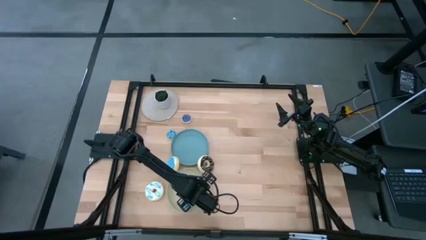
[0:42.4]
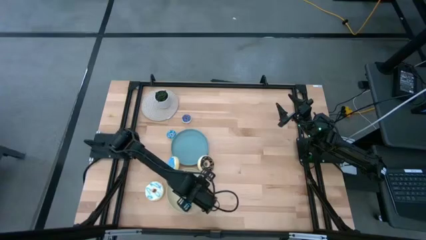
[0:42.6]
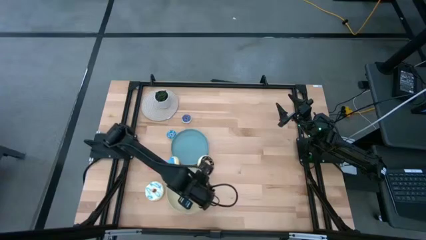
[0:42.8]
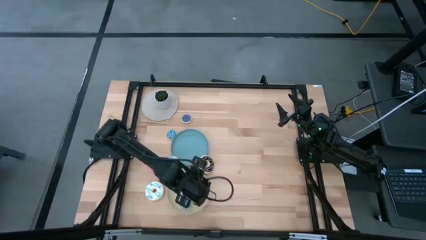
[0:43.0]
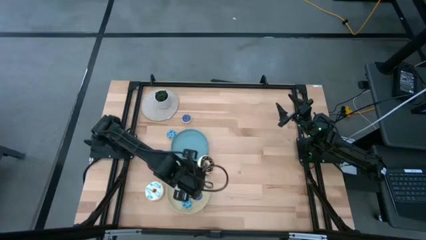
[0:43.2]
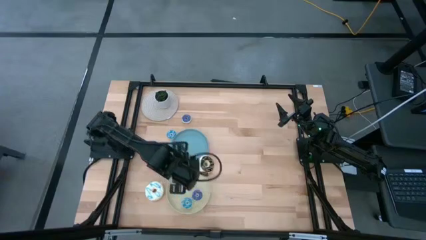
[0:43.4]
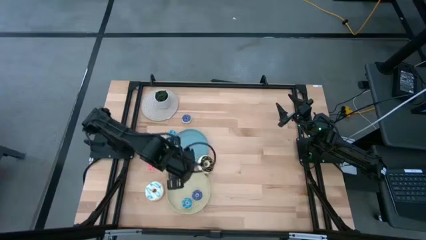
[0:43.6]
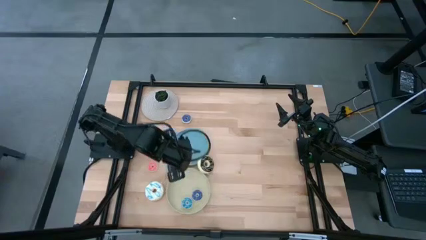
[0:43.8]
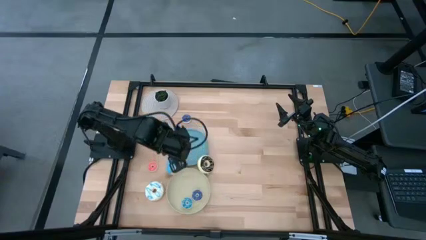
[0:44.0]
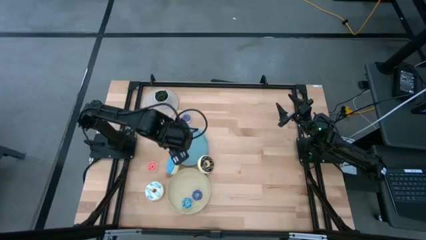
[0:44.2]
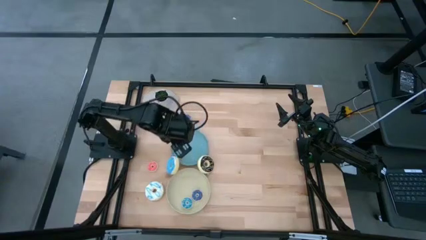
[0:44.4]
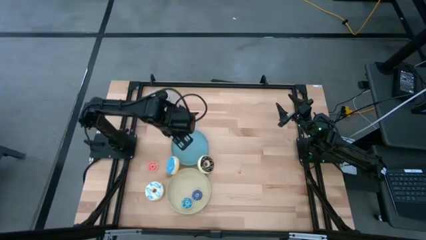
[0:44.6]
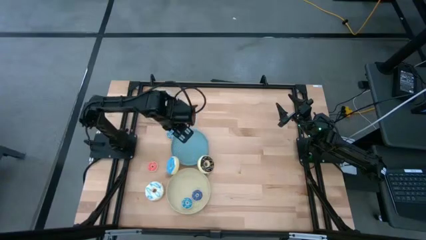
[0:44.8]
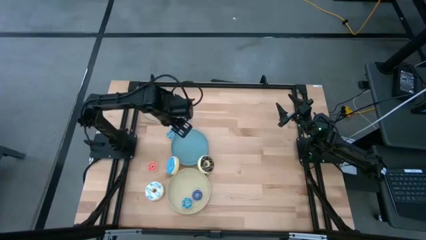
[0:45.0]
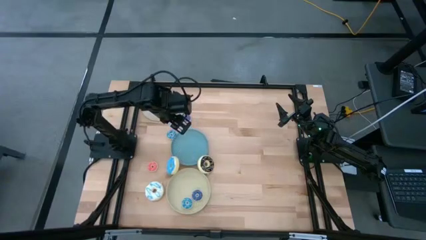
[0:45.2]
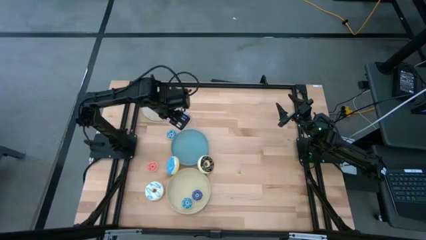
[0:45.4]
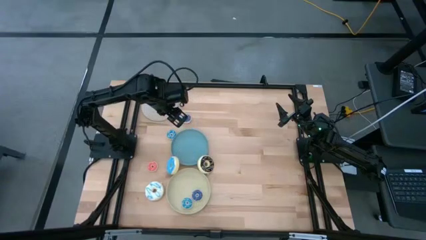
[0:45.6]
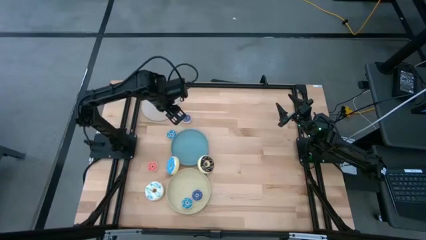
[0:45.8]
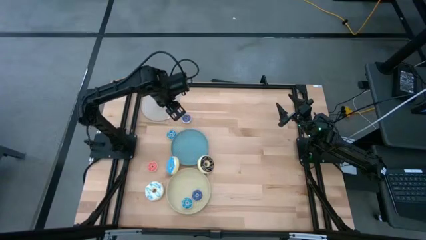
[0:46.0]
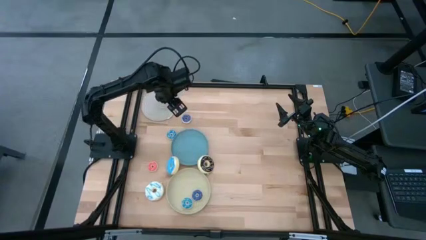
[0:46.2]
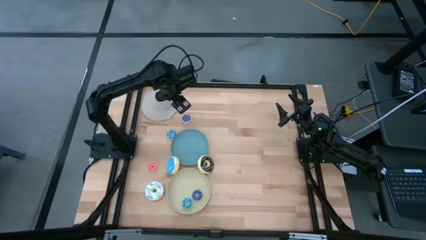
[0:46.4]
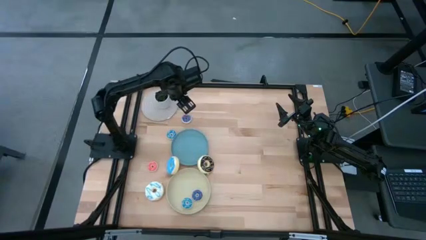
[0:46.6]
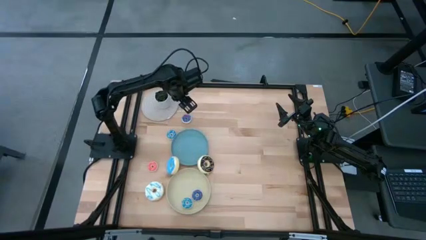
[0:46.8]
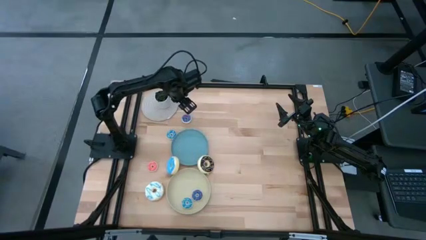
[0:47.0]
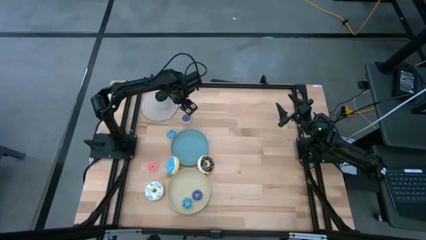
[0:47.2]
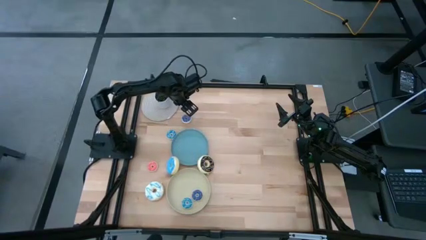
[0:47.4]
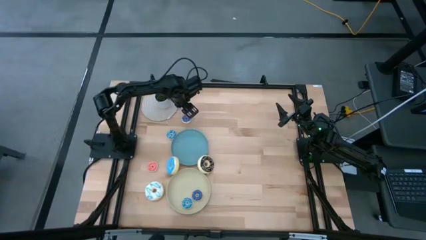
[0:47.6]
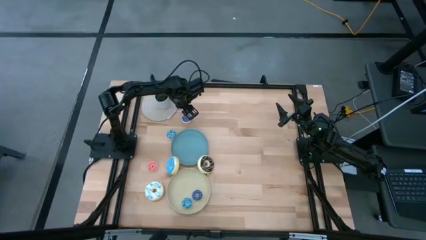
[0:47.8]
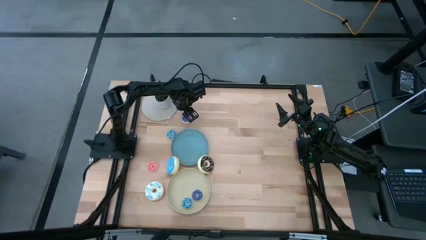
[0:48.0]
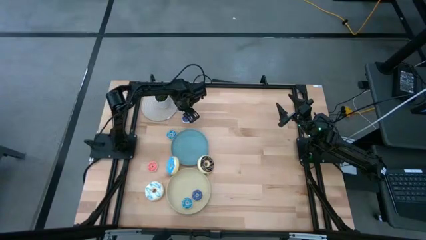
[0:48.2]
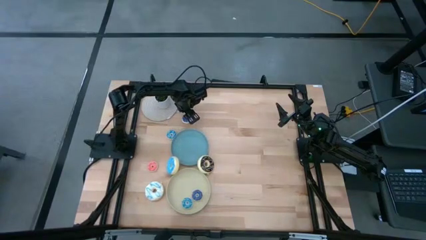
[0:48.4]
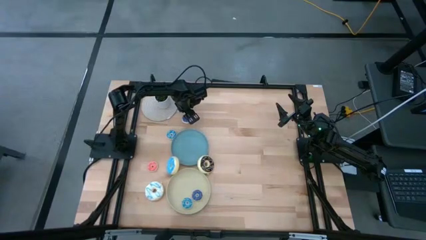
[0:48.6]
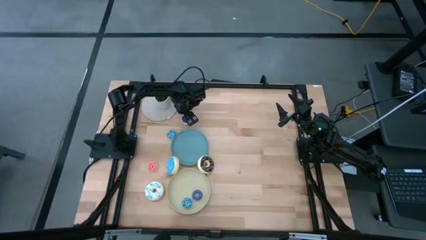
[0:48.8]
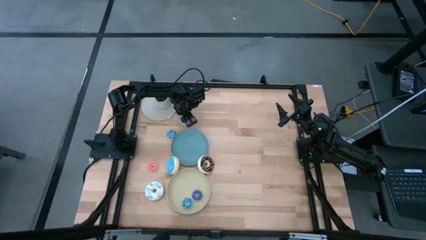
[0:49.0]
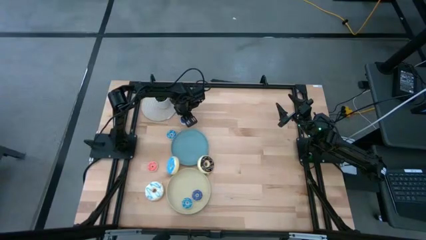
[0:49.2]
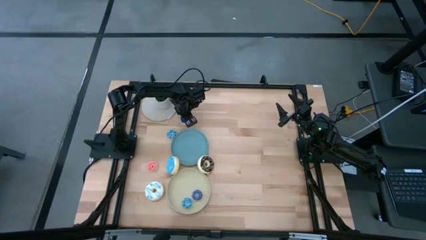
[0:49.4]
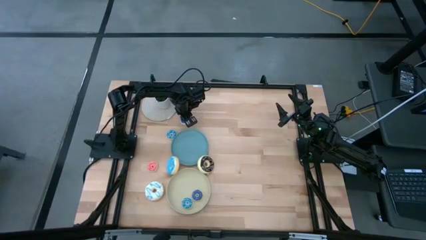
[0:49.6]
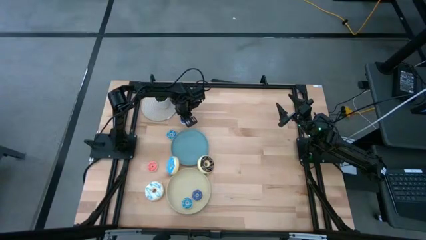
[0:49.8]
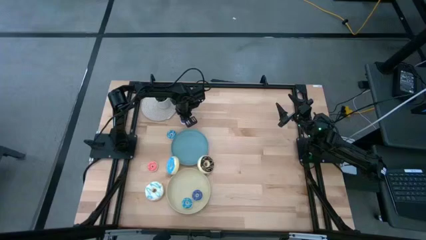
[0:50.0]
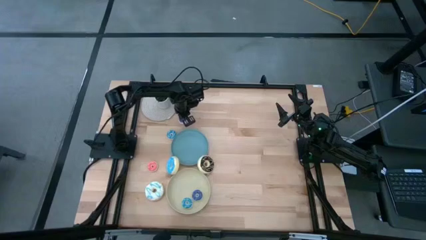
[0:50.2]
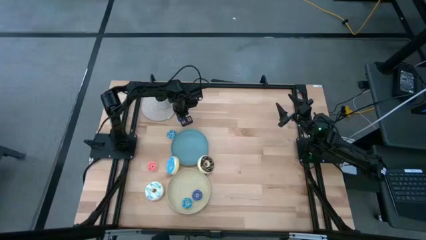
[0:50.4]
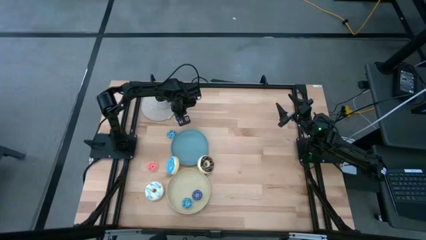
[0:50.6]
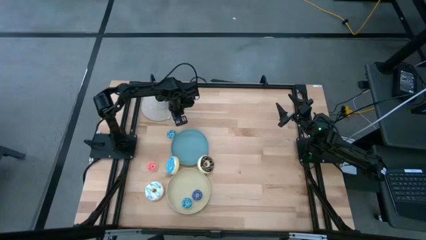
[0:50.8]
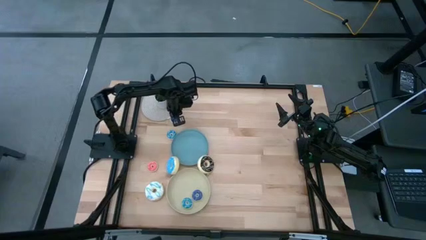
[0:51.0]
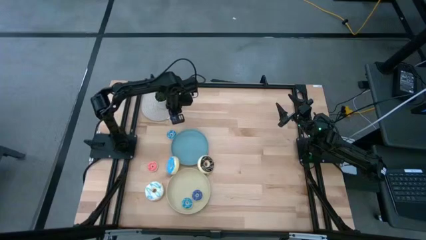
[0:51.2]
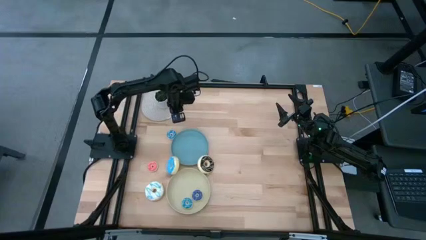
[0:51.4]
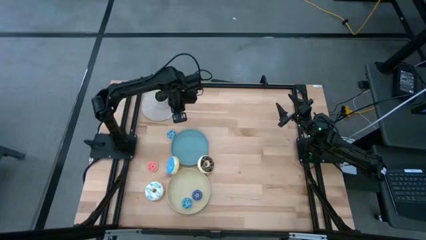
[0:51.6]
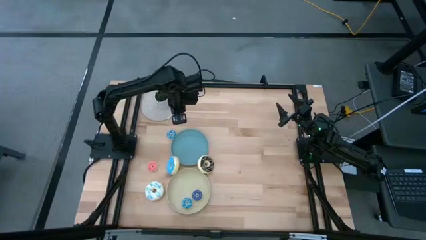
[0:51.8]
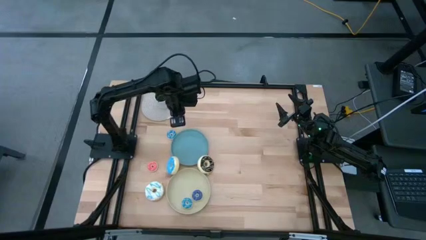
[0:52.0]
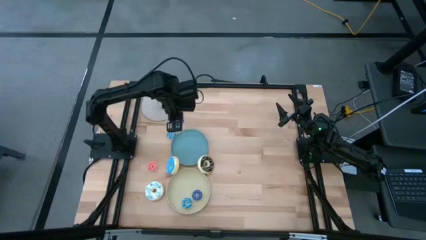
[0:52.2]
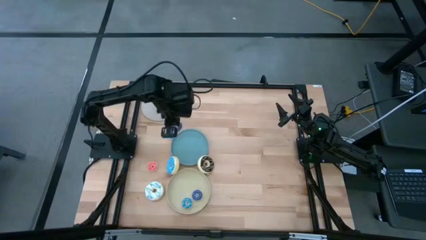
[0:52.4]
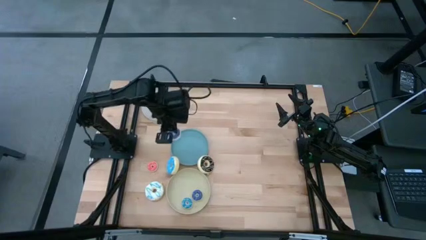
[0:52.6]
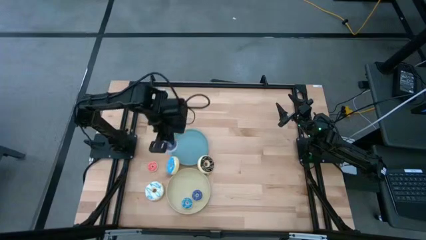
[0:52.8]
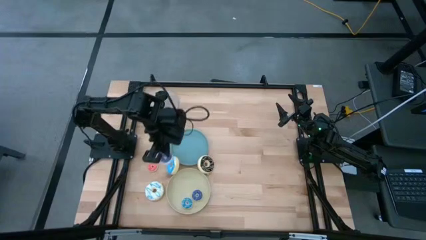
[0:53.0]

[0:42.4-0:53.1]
Task: Pick & Place donuts
Put the small blue donut on the gray plate
